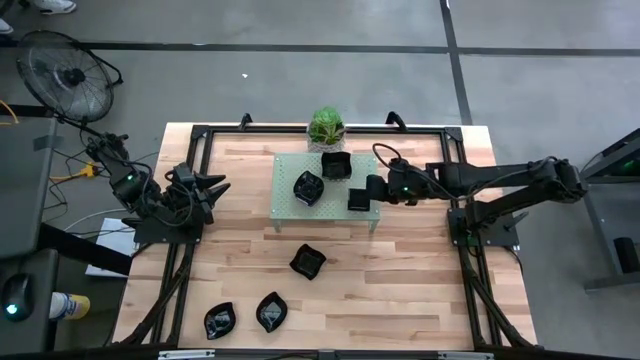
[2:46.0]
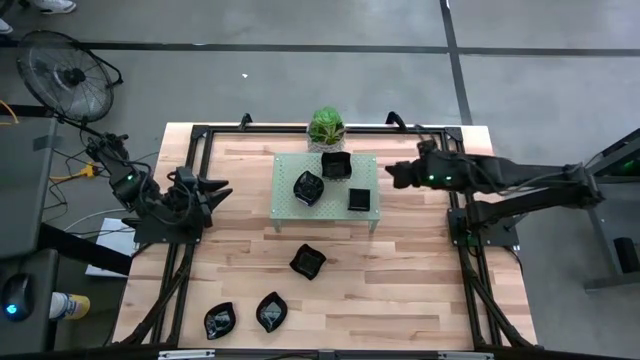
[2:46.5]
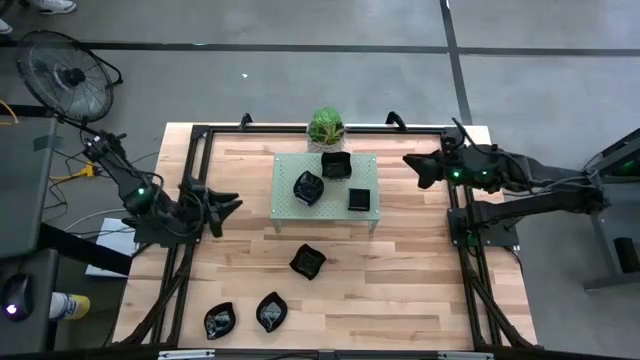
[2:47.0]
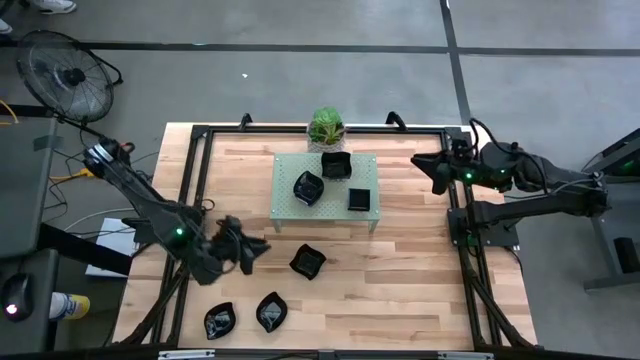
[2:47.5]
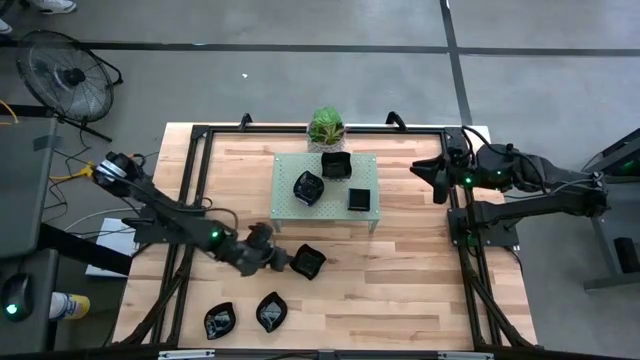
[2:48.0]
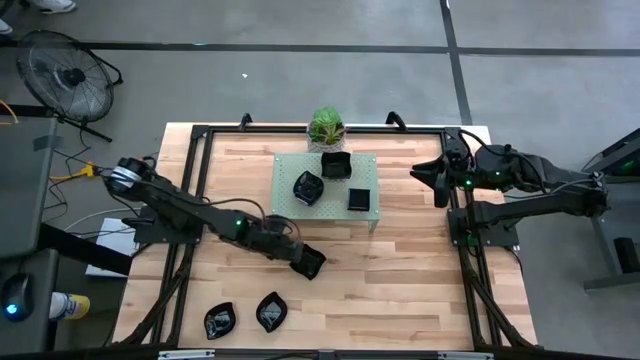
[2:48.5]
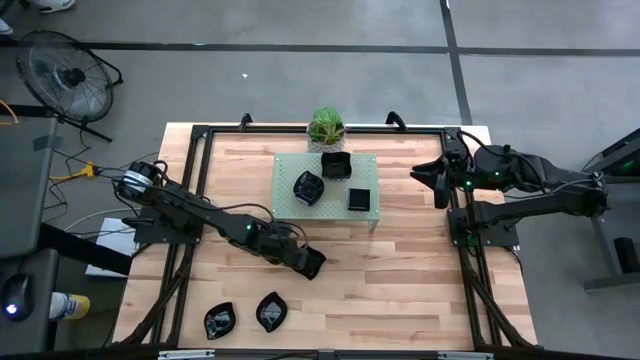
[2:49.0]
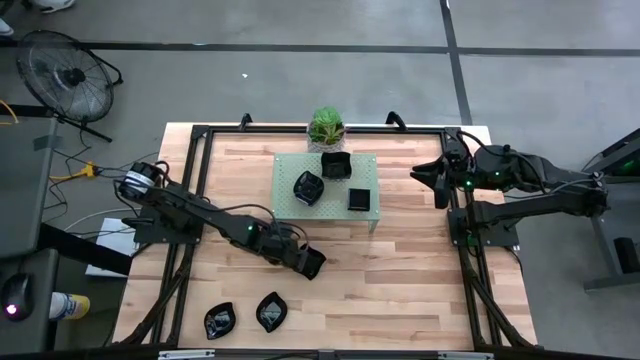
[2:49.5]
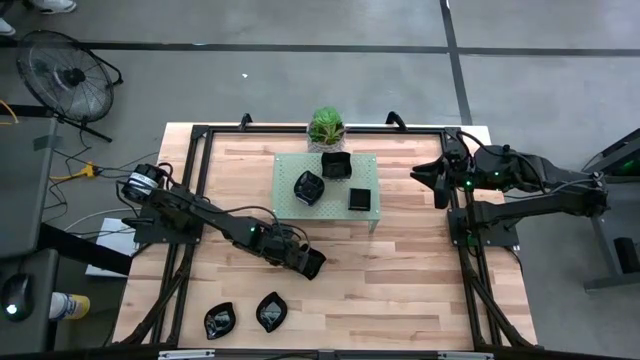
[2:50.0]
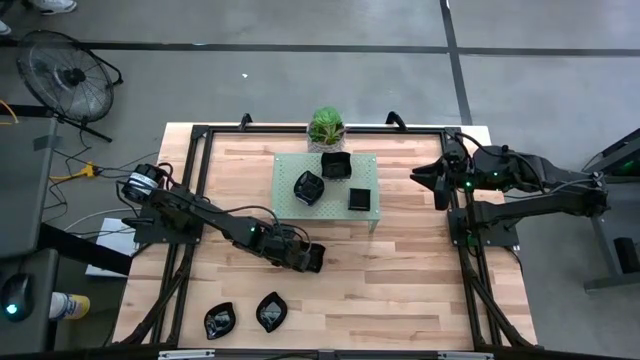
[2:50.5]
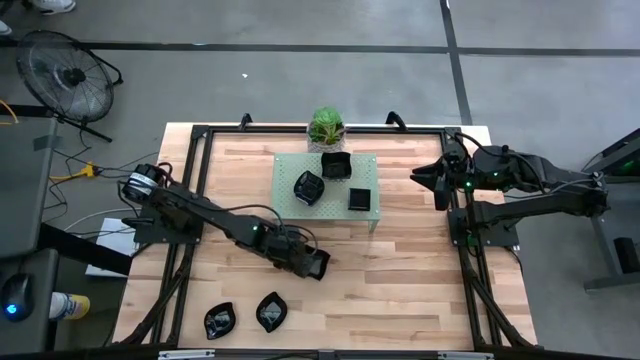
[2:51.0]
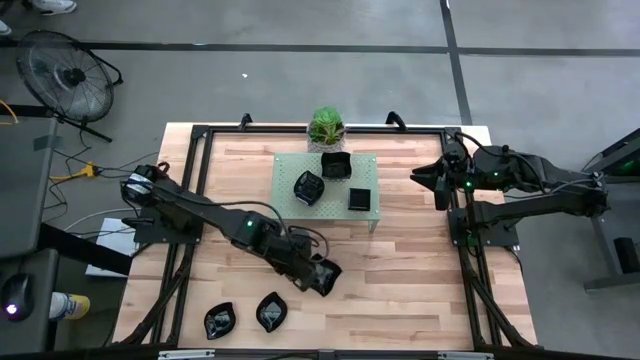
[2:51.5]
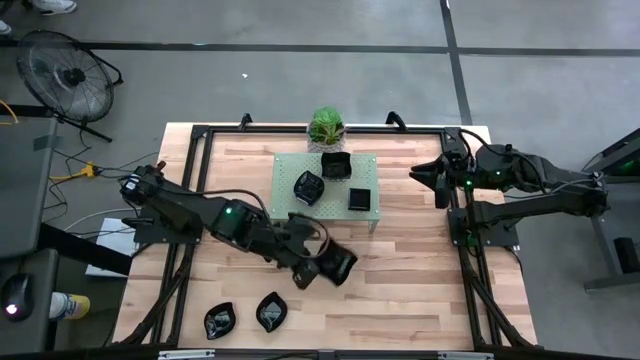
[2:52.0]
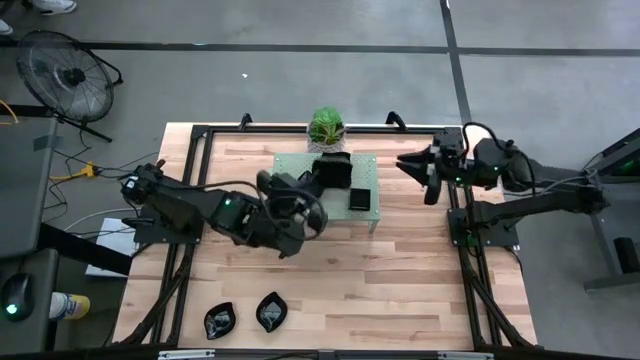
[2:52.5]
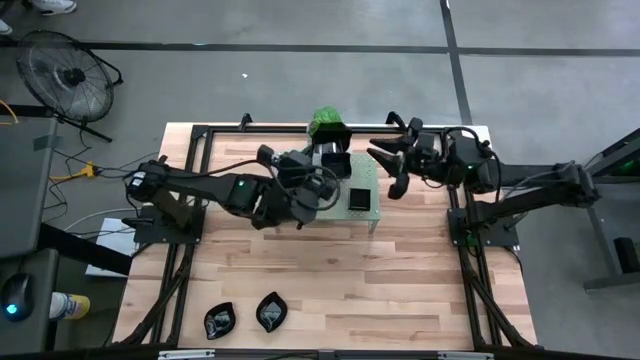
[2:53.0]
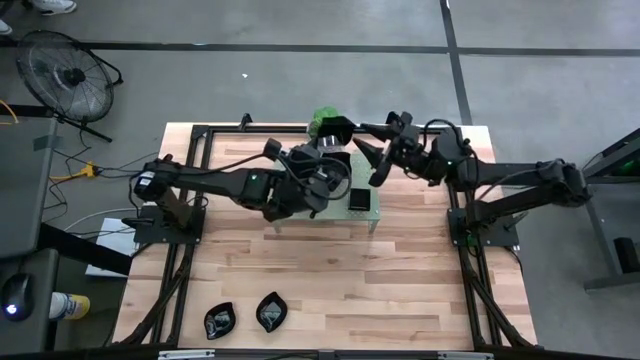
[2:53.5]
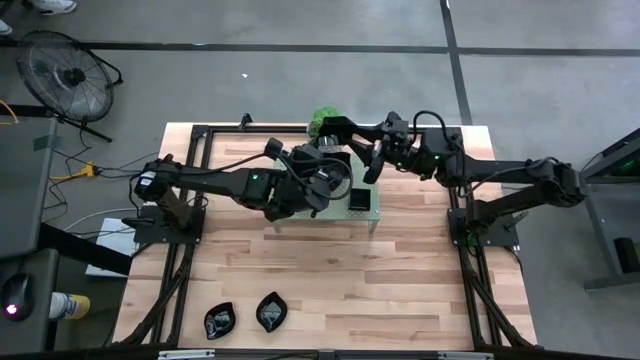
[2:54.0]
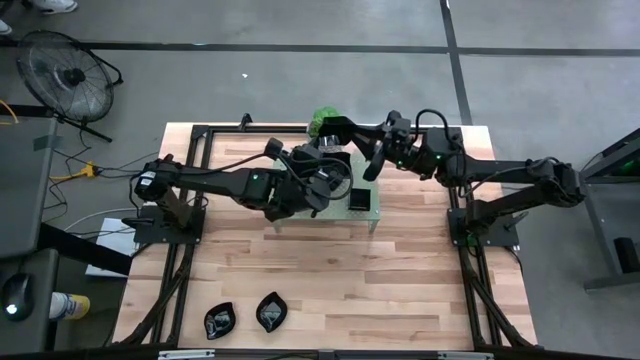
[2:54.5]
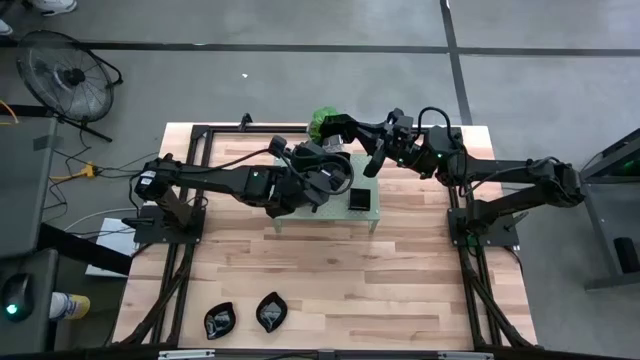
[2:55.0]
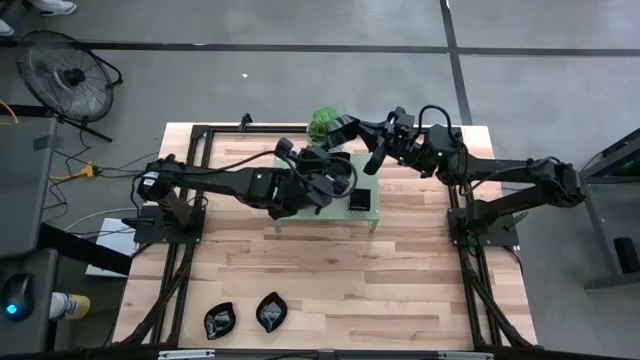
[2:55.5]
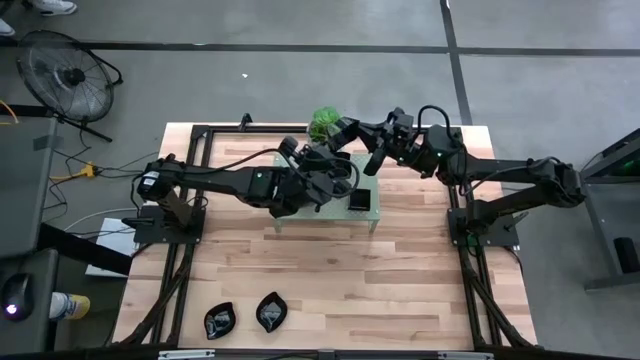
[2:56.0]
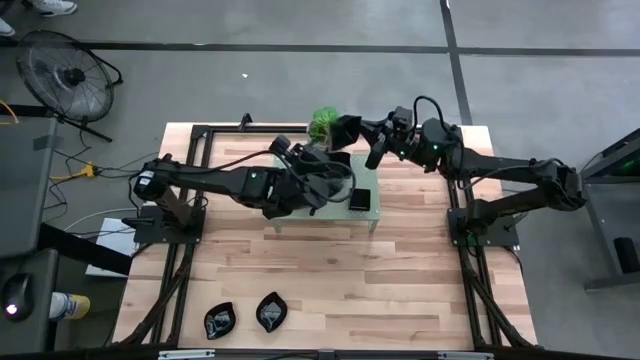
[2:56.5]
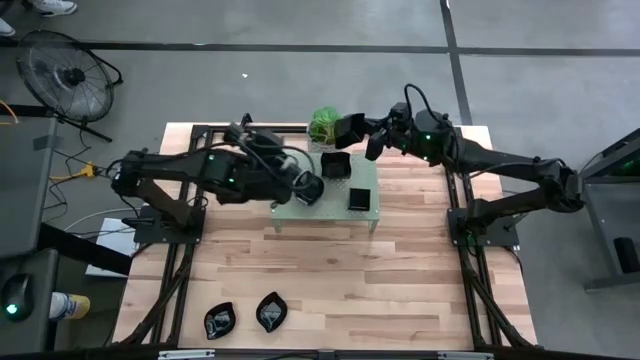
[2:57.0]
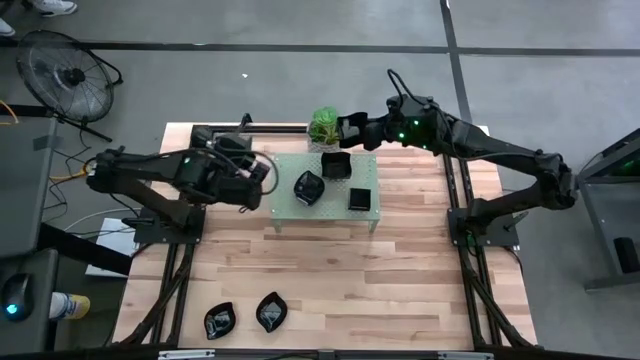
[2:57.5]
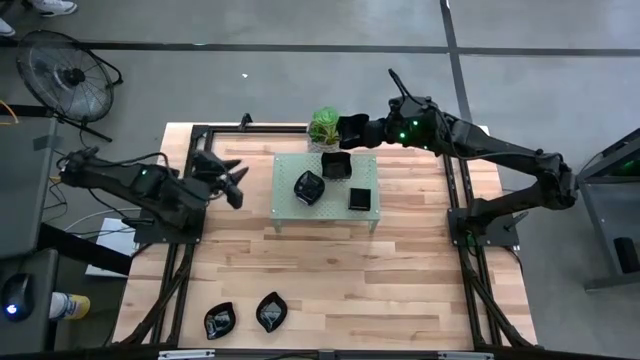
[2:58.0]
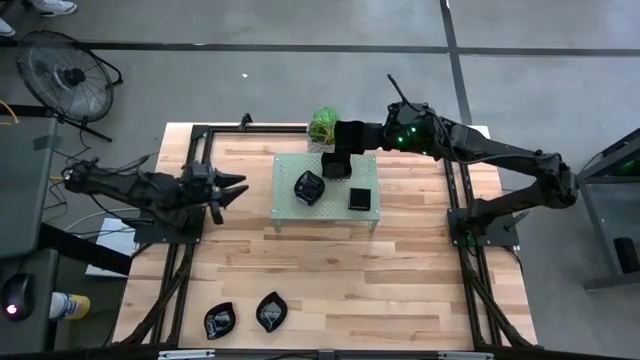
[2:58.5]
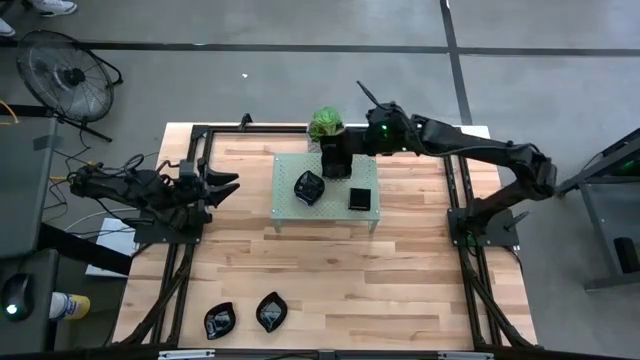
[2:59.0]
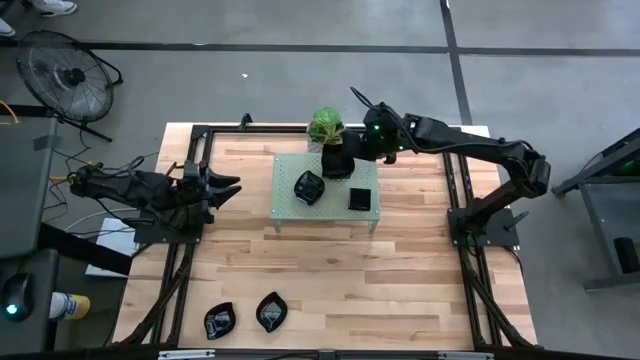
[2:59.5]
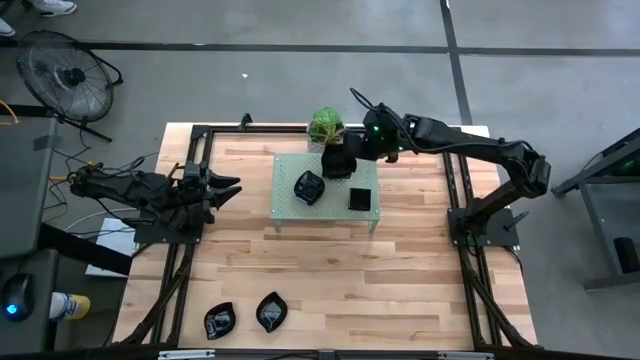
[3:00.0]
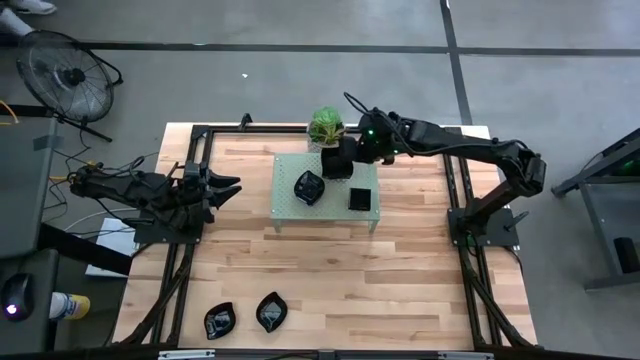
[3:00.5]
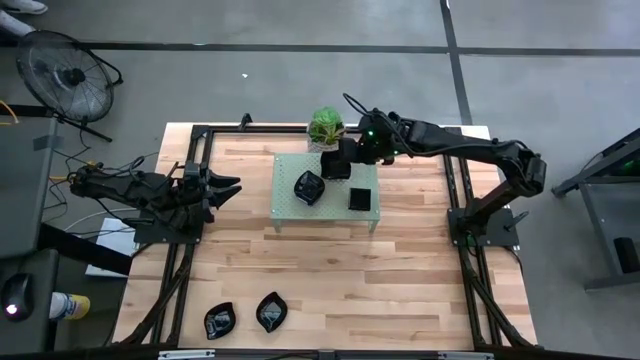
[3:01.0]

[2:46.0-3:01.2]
Task: Pick & Place Mini shaped plates
Stack the black distorted square plate on the other black distorted square plate on the shelf

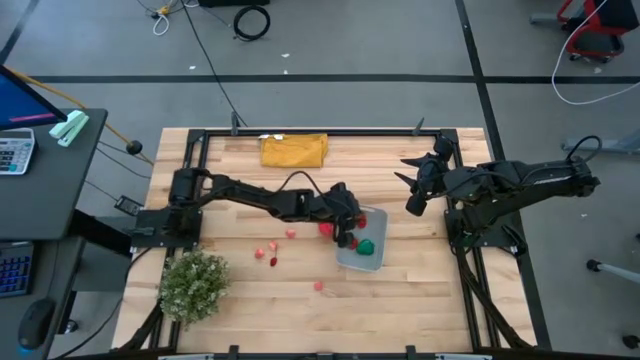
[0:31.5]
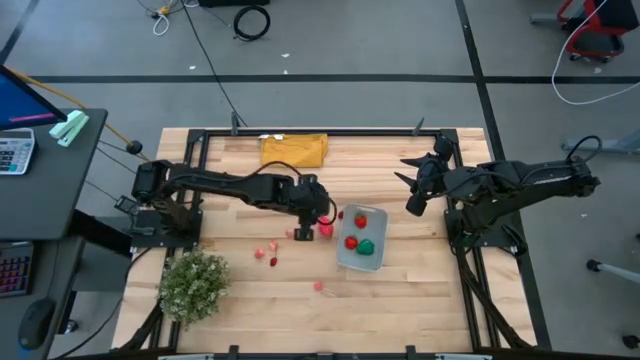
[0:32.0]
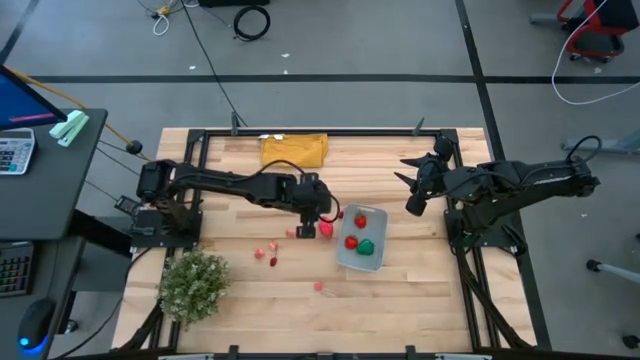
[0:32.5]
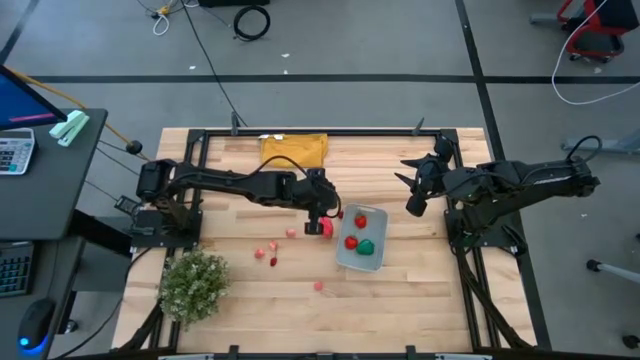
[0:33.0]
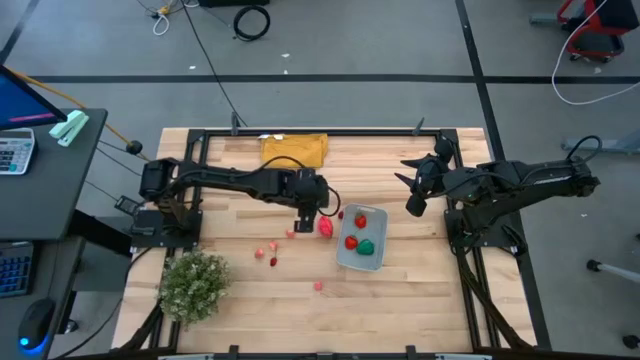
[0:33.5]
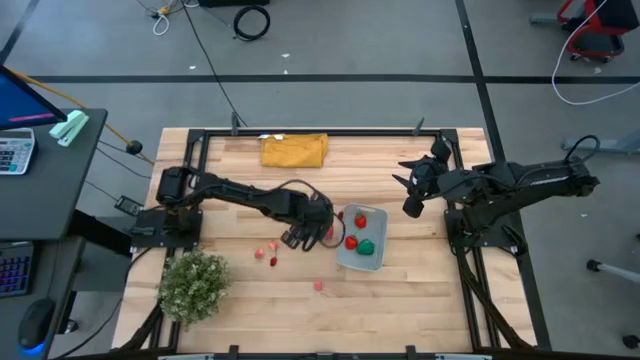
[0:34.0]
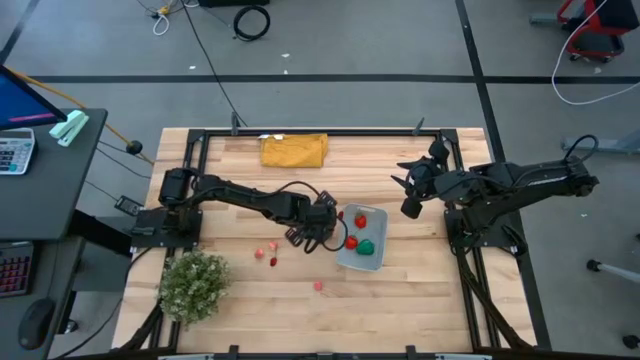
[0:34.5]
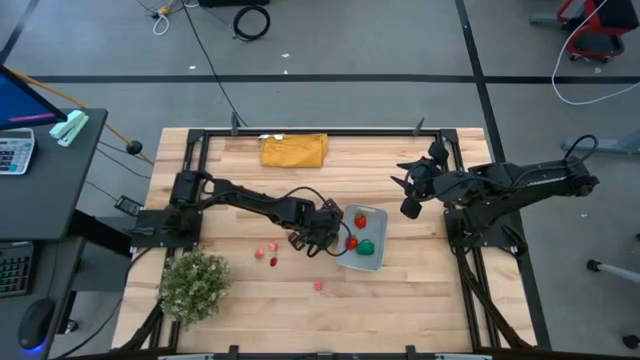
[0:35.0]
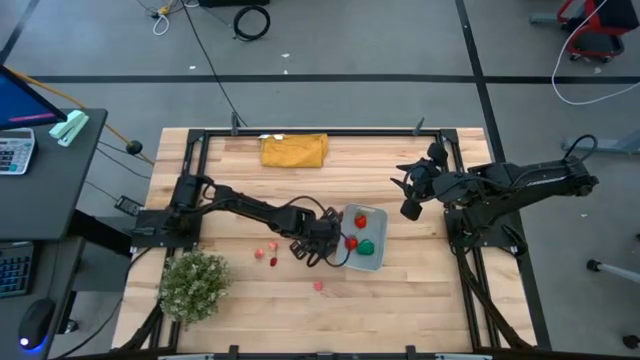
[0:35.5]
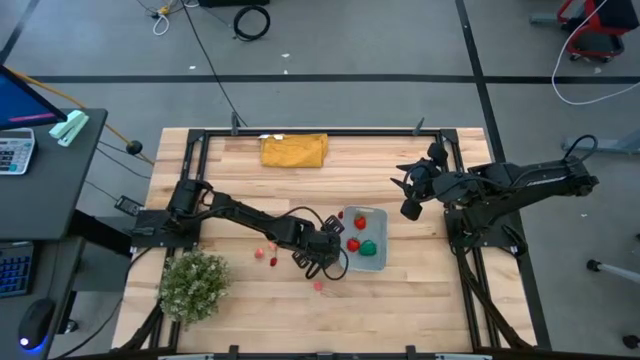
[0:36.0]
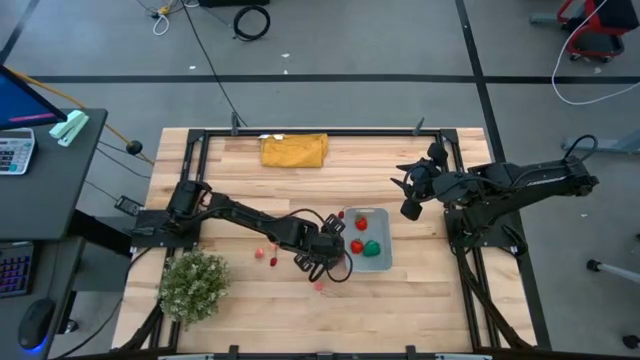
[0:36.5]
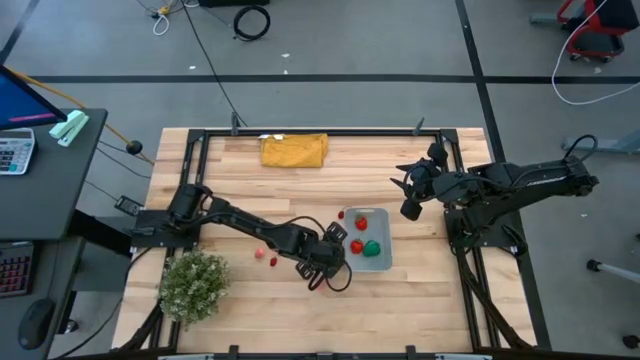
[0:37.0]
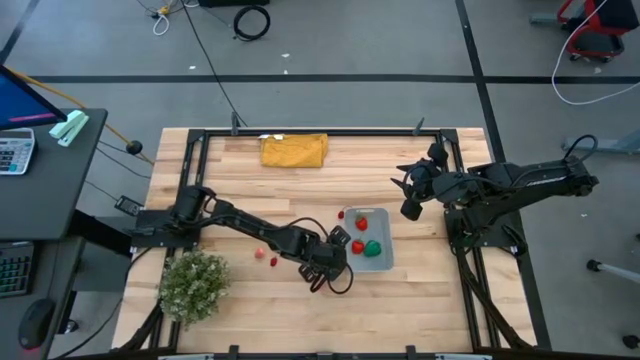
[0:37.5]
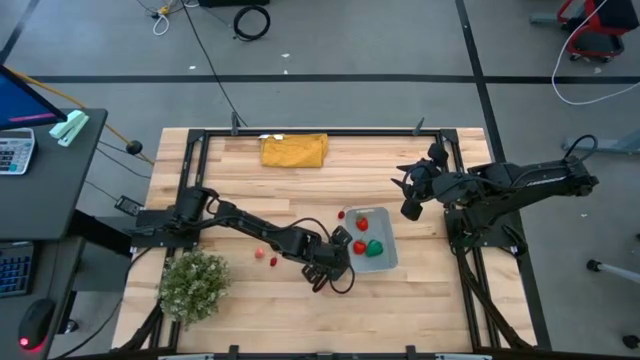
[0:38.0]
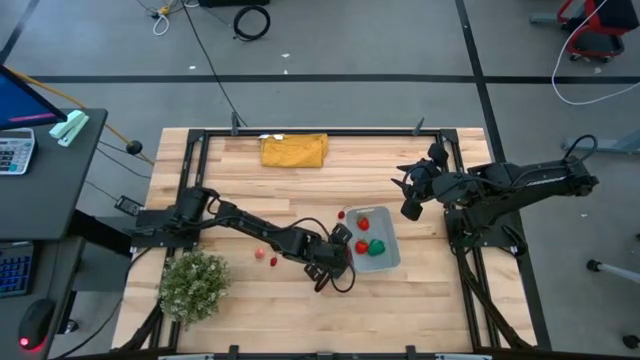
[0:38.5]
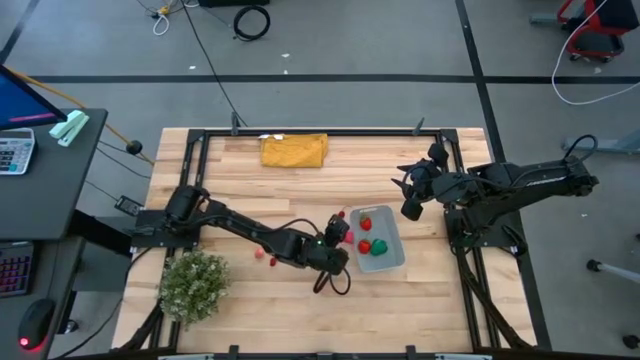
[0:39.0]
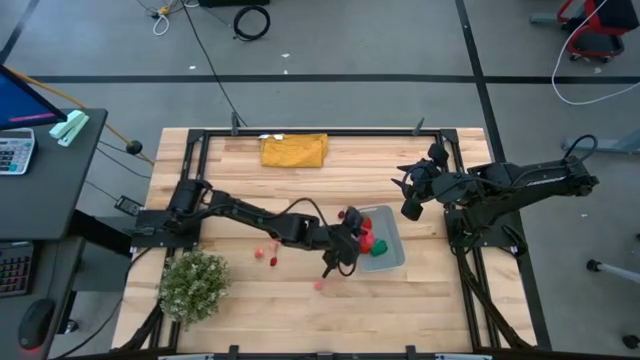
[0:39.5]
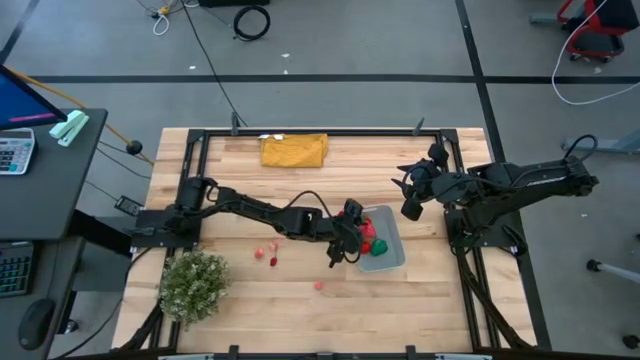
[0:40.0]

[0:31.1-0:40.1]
Task: Pick and placing Produce into tupperware
Put the red dragon fruit into the gray bin
